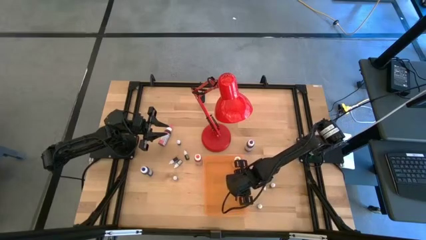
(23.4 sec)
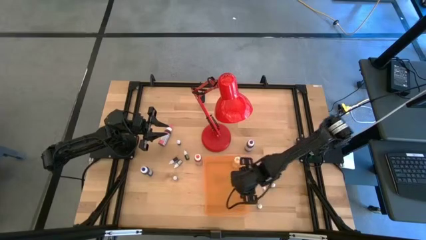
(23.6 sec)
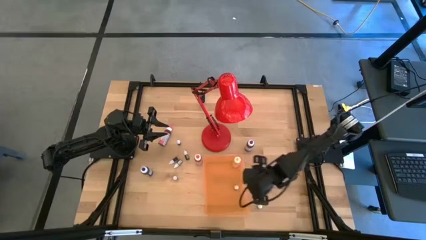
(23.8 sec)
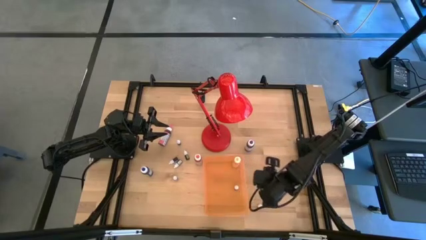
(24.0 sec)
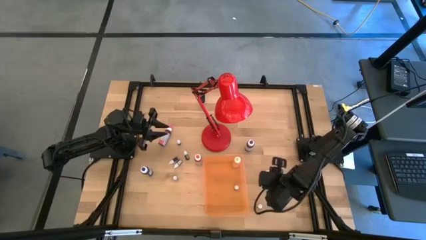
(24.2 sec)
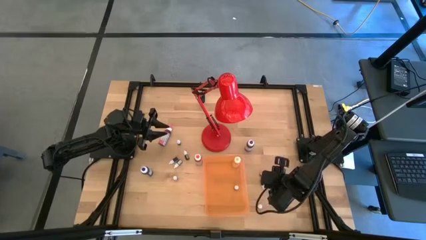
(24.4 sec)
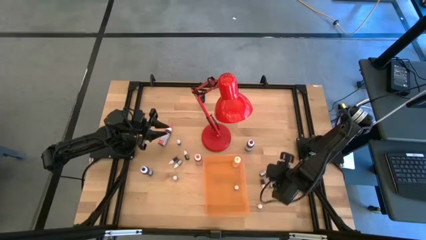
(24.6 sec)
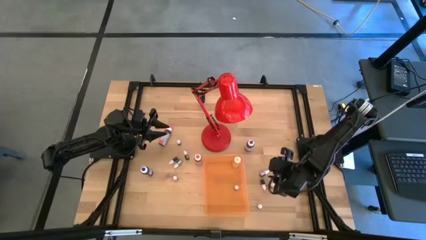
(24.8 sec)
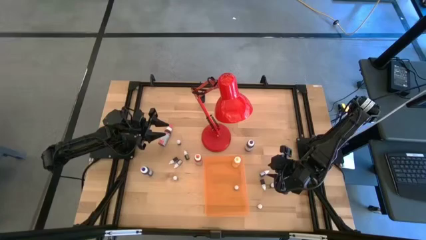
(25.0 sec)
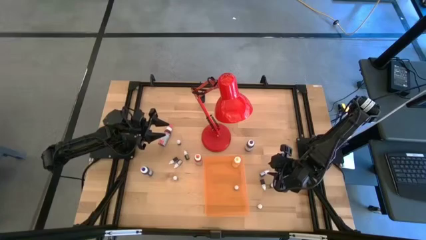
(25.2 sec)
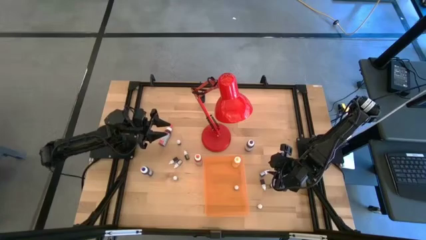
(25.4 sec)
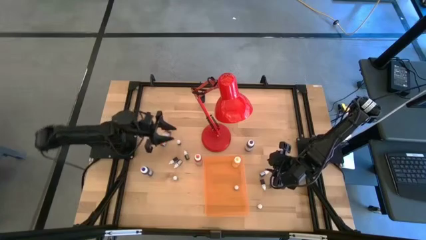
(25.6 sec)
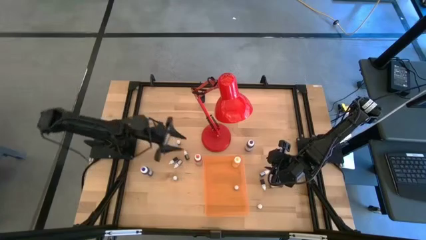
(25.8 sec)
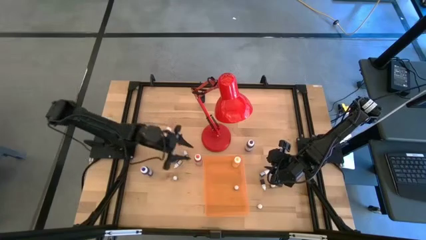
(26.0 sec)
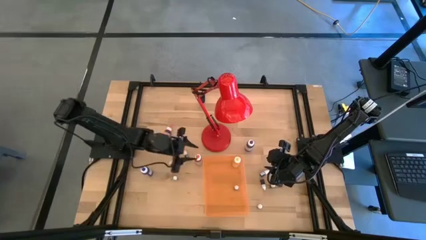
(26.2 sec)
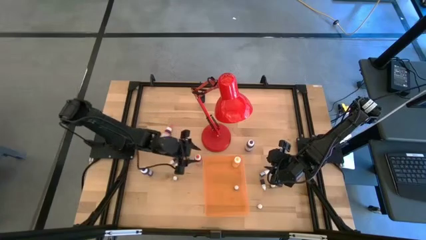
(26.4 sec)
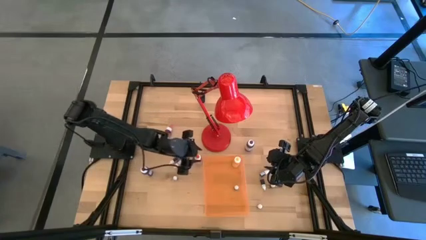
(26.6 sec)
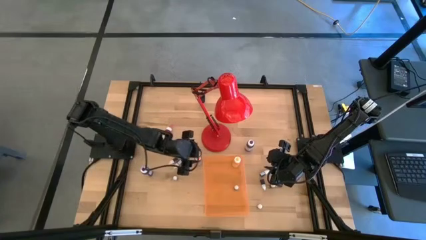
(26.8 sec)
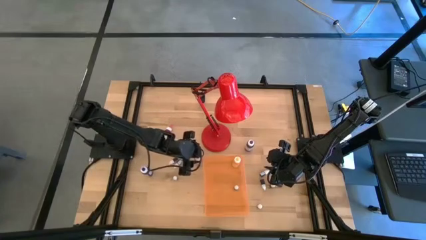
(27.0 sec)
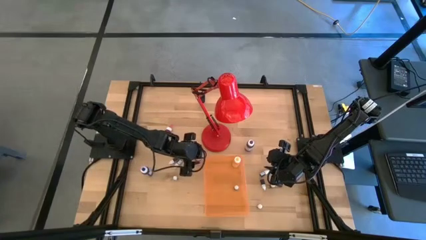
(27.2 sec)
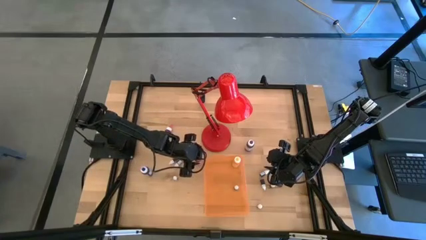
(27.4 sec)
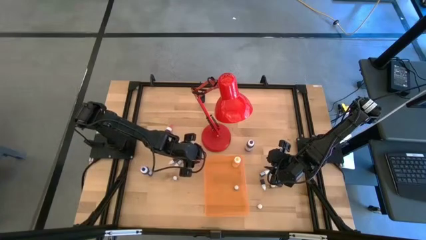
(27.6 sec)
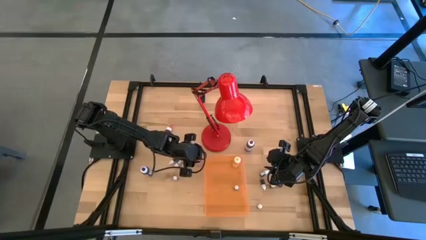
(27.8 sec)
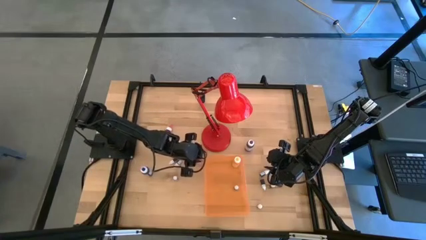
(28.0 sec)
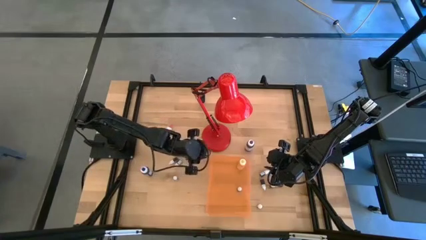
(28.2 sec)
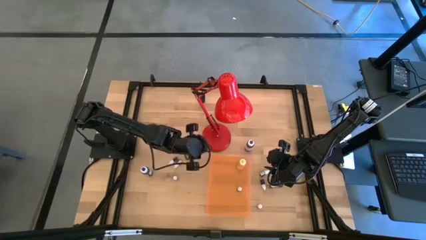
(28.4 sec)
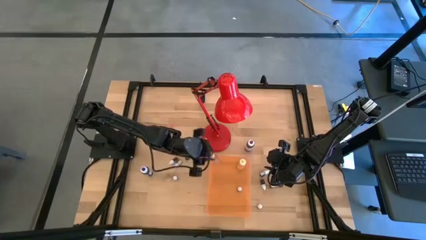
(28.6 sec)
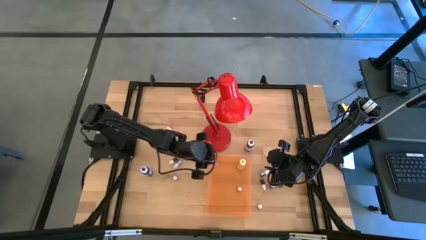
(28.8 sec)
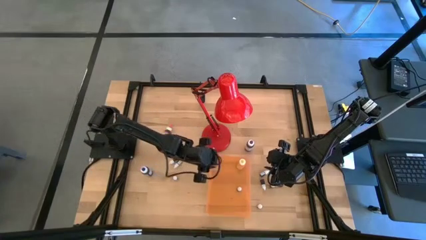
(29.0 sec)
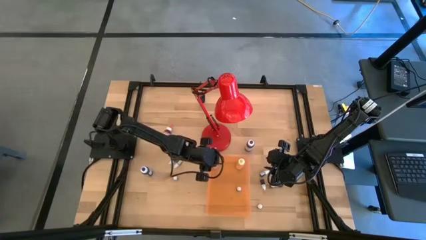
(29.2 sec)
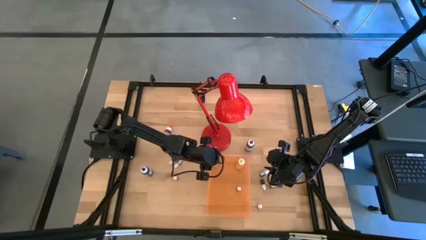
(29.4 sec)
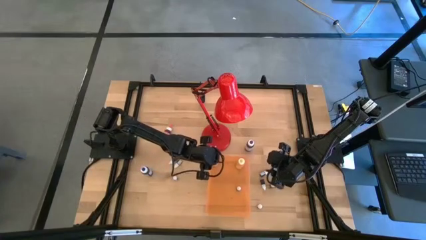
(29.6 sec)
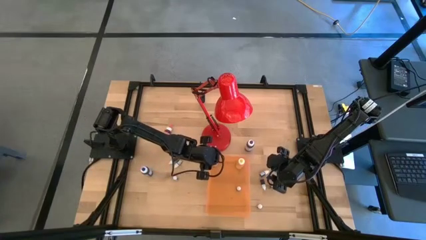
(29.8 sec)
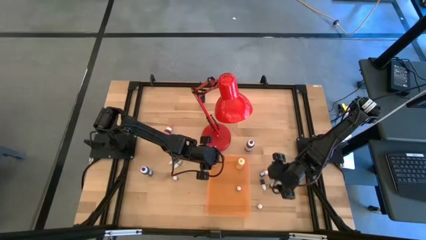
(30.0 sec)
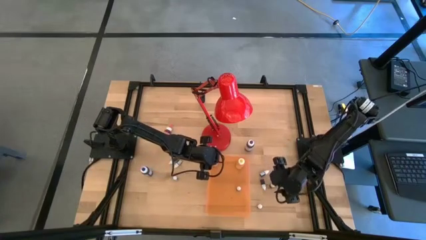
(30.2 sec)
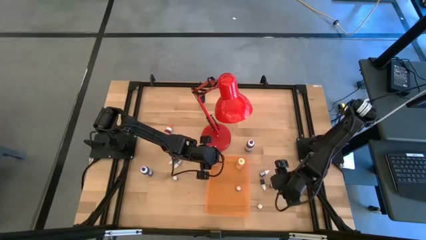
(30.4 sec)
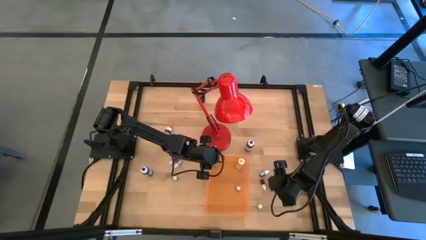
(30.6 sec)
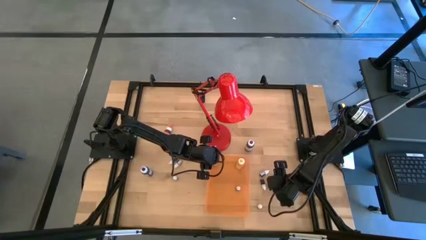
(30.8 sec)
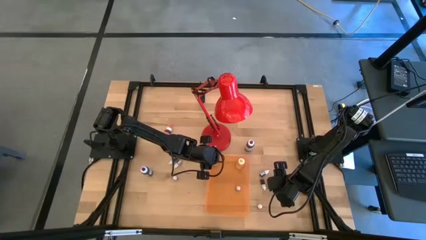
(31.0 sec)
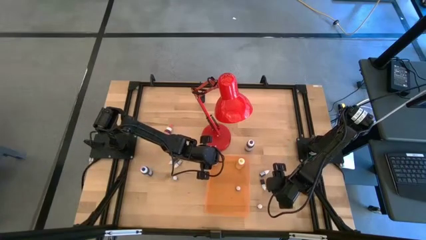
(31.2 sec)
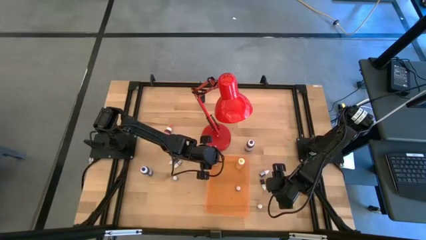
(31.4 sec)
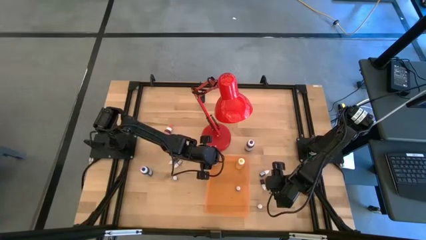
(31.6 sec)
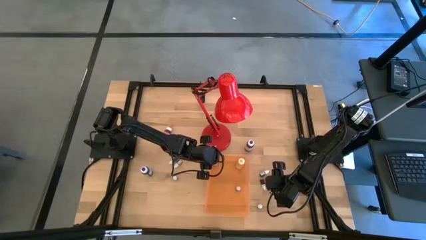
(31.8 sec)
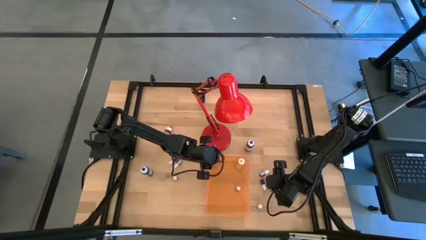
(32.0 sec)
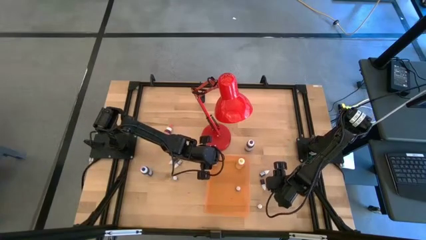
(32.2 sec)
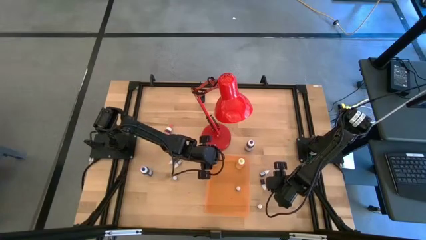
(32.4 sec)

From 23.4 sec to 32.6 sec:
Task: Pick & Place food coloring
Put the large orange food coloring bottle into the orange bin

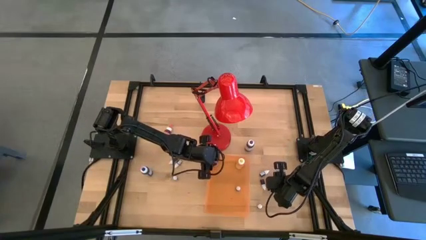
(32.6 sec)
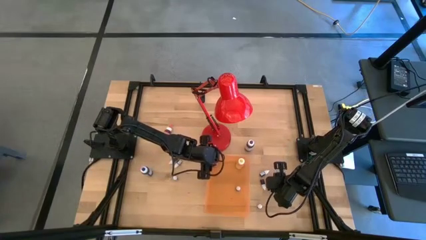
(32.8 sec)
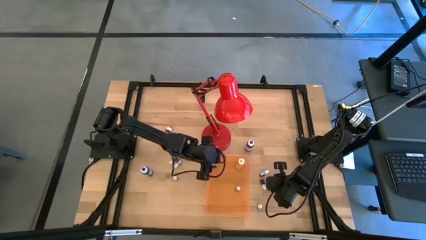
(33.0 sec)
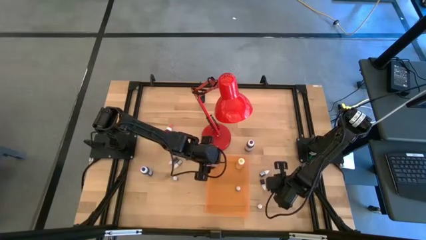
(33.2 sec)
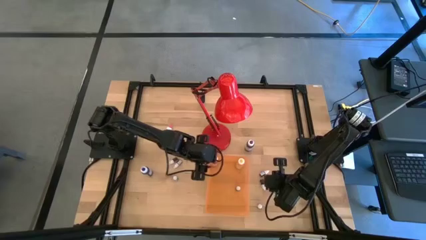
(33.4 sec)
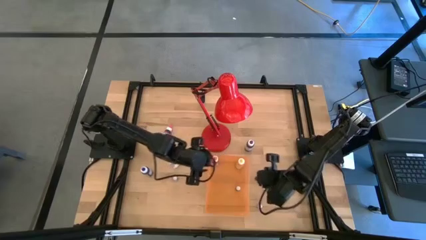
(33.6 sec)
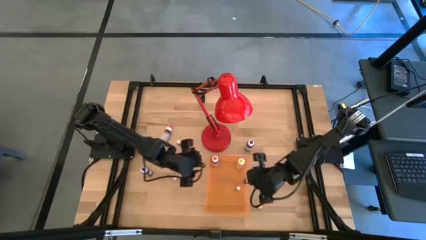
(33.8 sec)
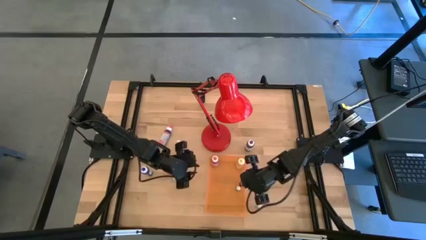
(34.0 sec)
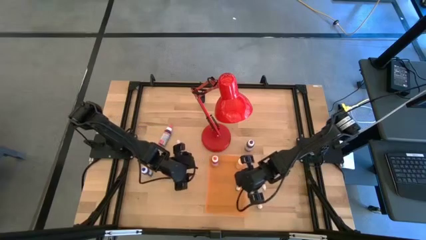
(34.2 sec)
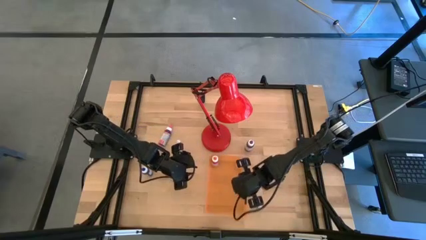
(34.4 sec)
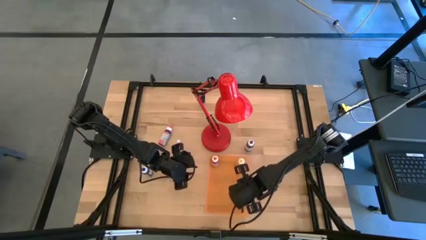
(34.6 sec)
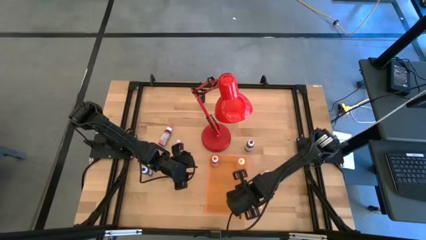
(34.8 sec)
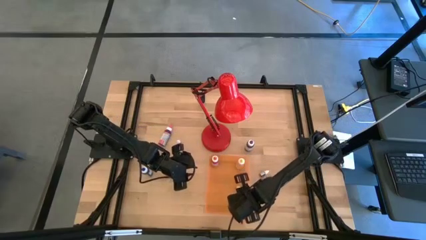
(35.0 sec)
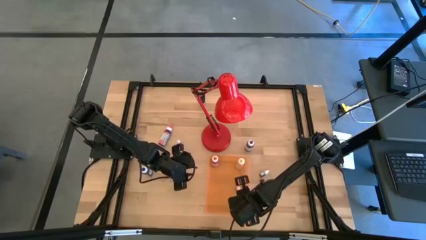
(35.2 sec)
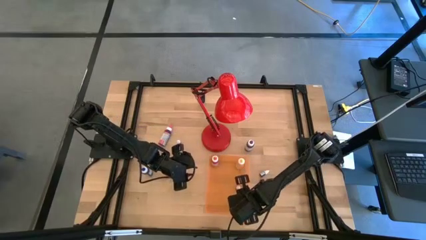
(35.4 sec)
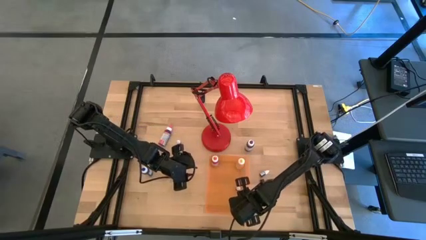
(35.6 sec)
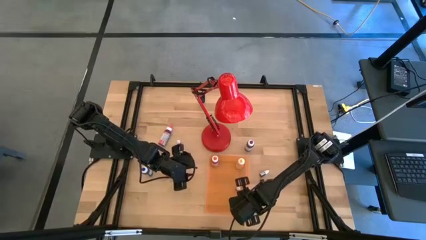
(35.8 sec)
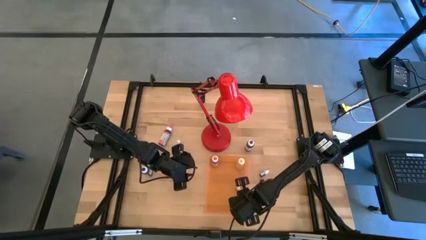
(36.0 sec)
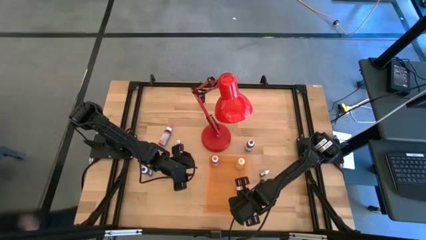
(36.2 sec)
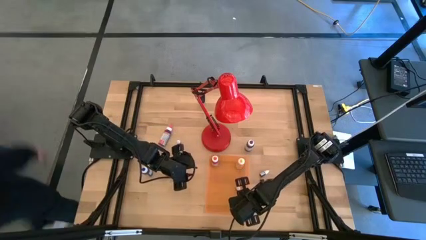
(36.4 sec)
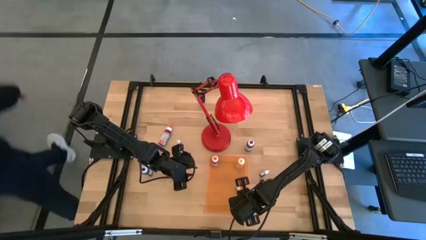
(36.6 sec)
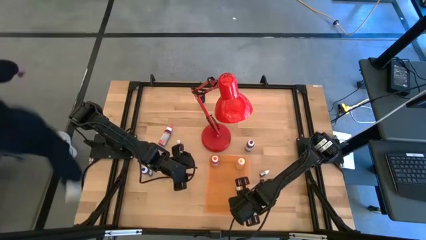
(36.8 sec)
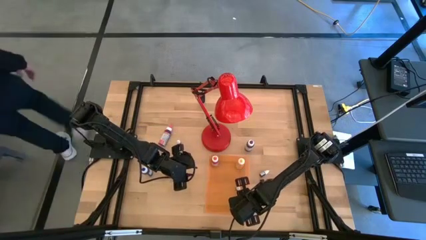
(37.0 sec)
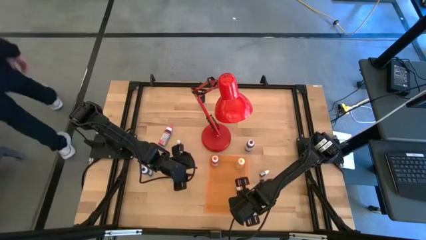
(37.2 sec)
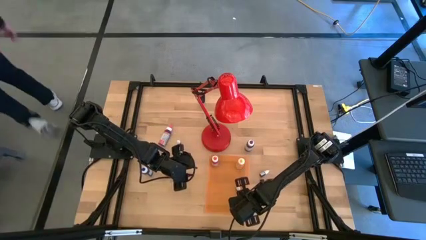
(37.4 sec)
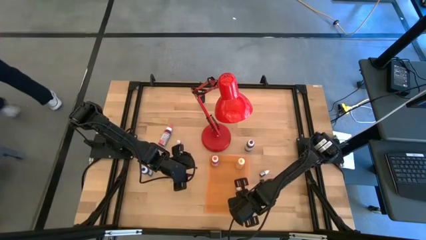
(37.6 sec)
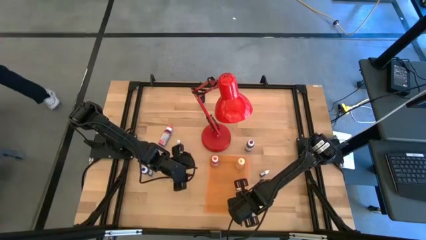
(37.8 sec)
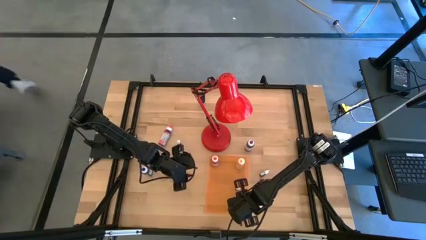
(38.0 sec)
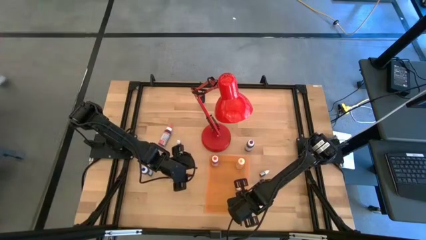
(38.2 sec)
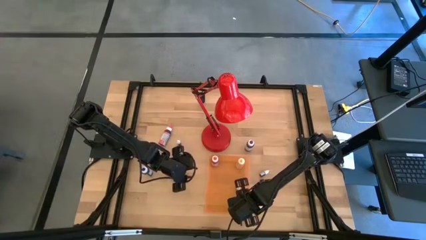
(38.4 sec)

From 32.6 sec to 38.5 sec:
Put the small black food coloring bottle into the orange bin
